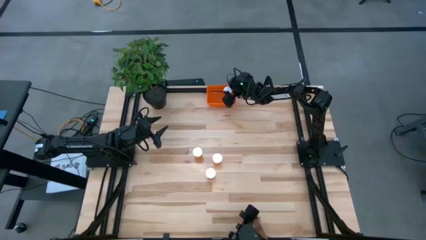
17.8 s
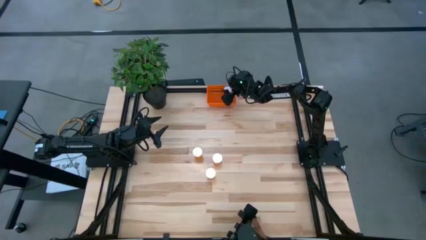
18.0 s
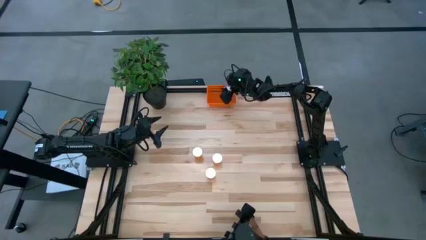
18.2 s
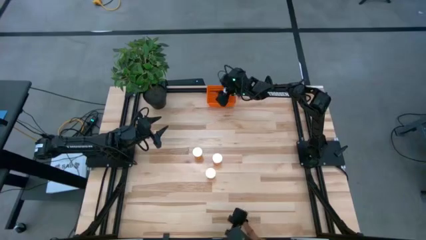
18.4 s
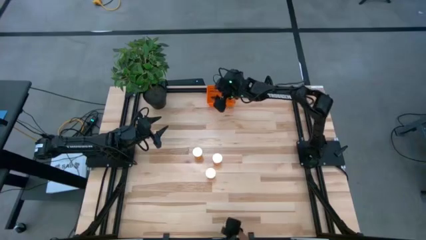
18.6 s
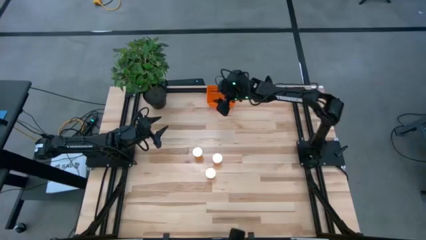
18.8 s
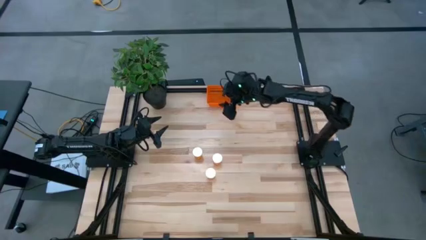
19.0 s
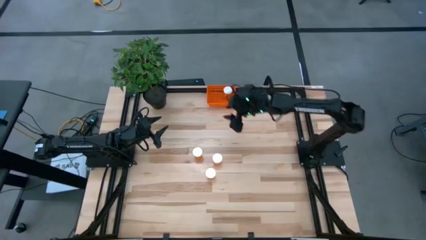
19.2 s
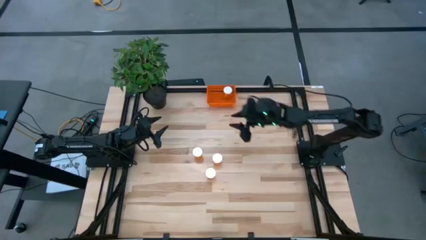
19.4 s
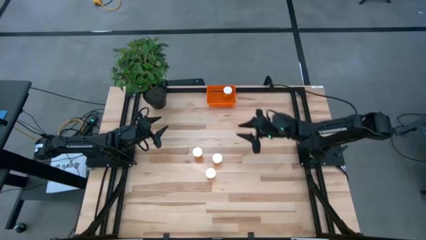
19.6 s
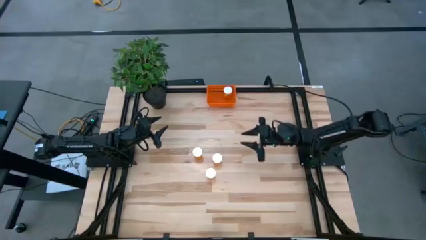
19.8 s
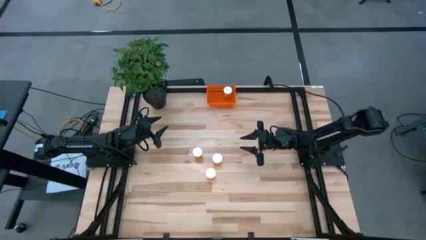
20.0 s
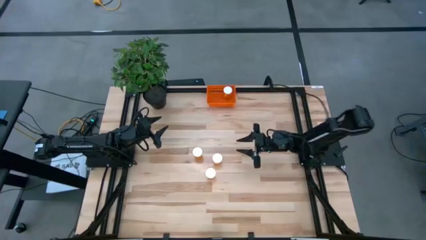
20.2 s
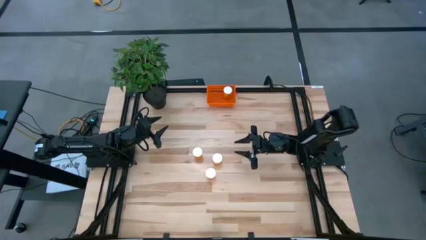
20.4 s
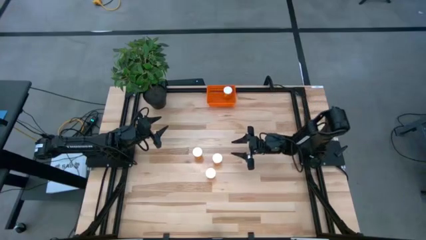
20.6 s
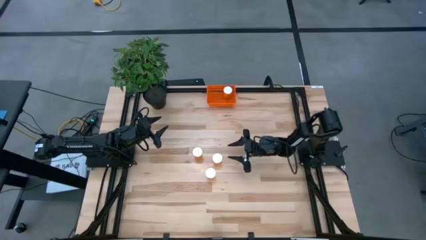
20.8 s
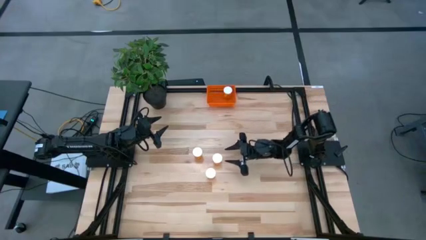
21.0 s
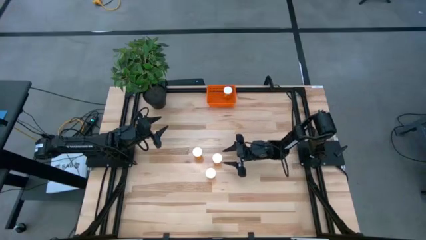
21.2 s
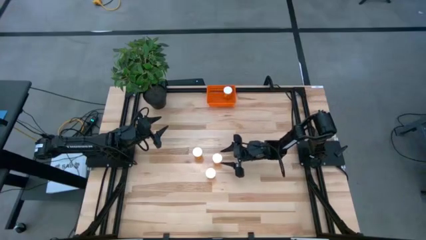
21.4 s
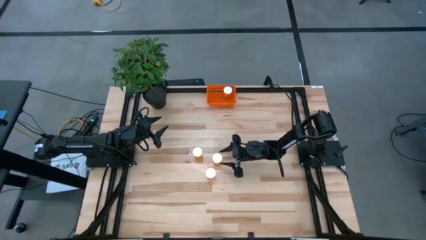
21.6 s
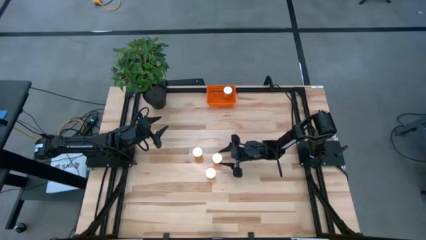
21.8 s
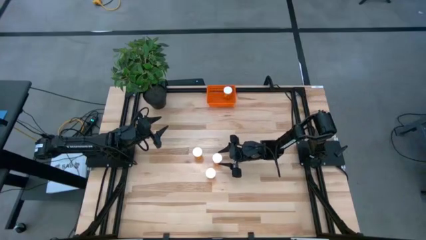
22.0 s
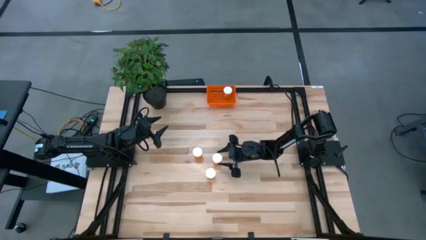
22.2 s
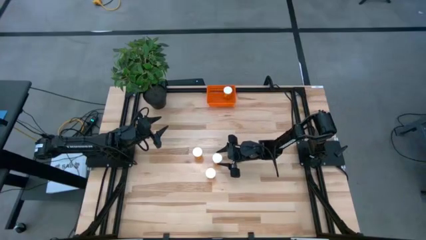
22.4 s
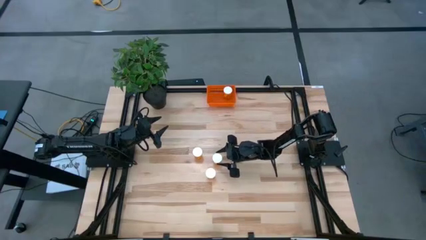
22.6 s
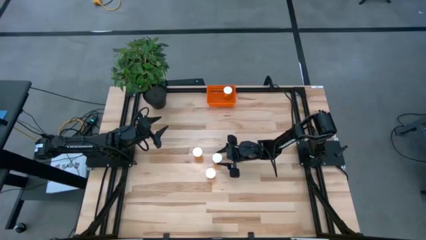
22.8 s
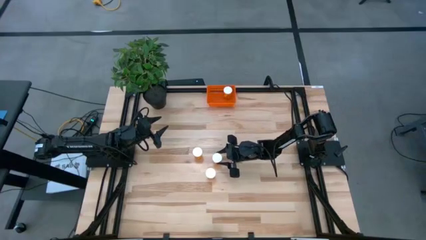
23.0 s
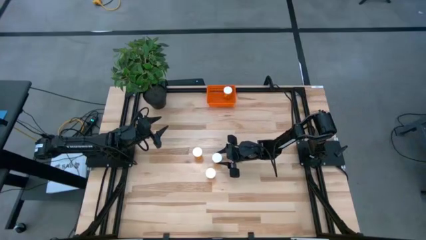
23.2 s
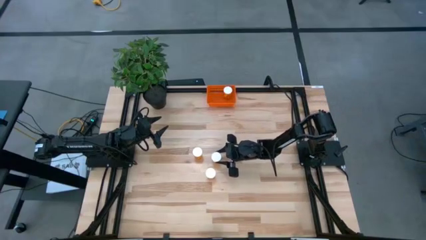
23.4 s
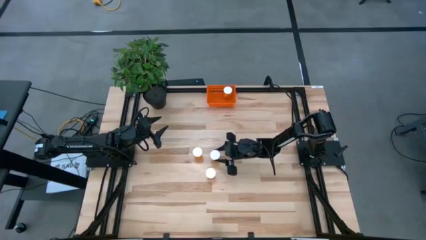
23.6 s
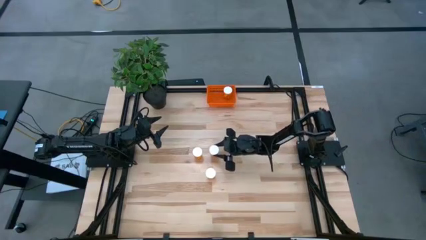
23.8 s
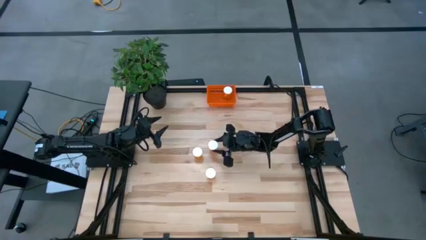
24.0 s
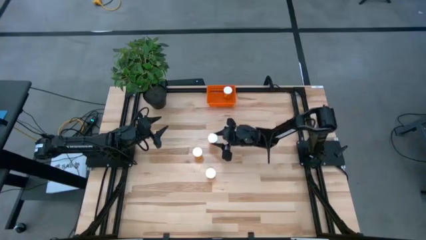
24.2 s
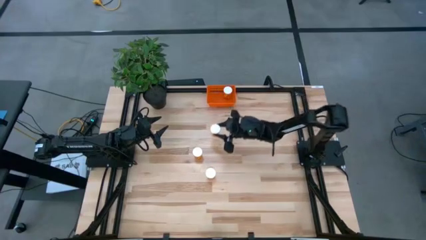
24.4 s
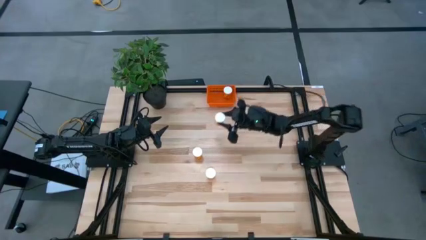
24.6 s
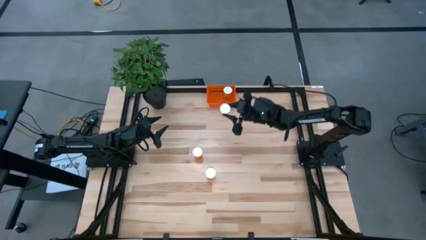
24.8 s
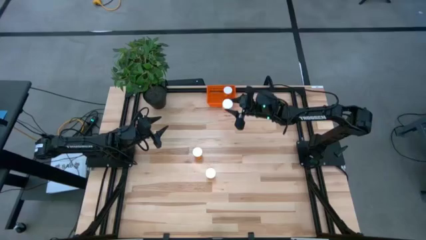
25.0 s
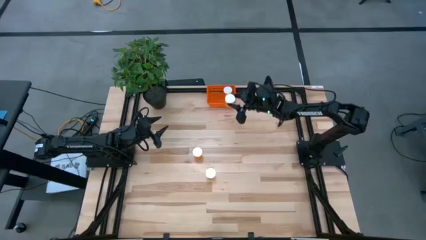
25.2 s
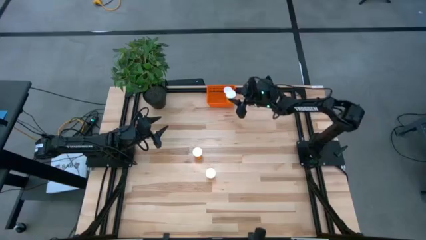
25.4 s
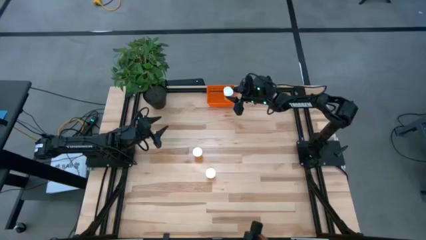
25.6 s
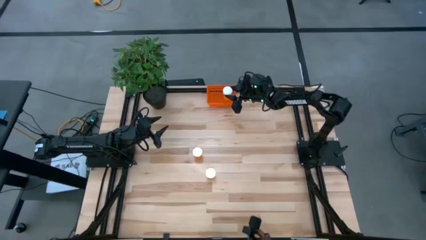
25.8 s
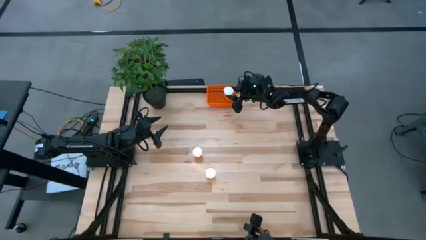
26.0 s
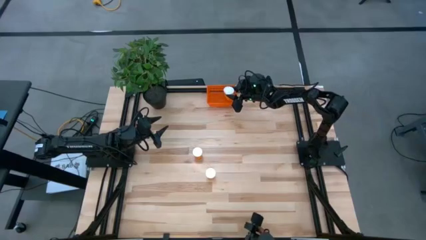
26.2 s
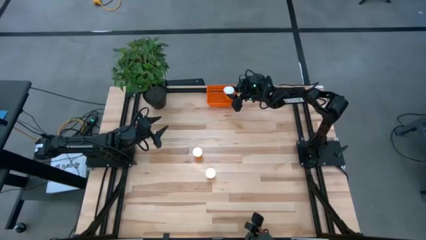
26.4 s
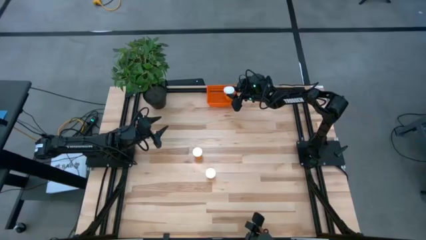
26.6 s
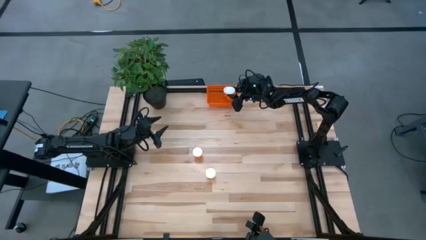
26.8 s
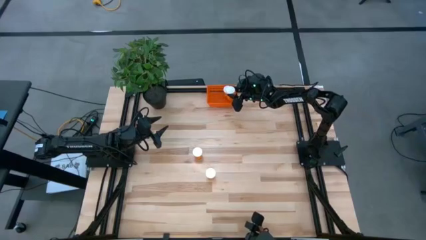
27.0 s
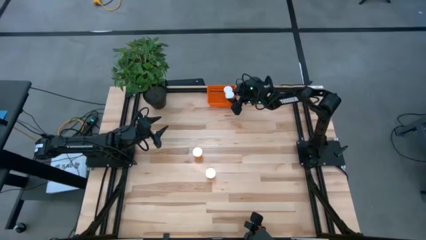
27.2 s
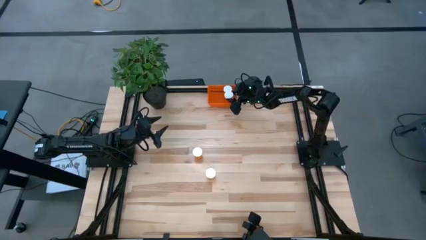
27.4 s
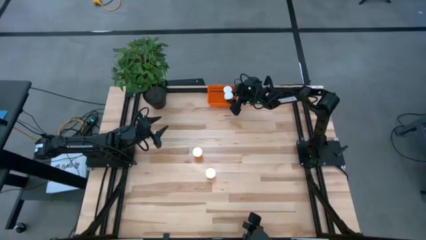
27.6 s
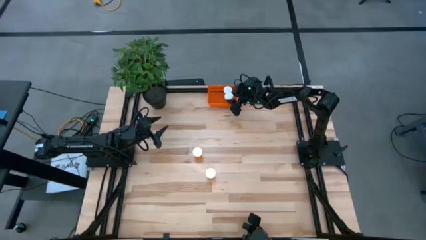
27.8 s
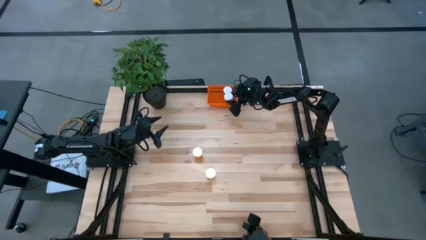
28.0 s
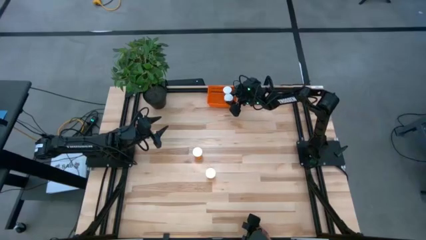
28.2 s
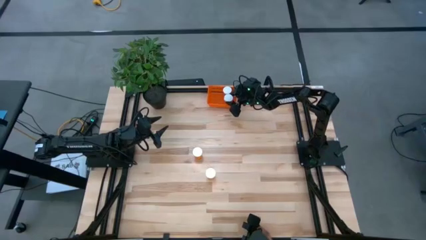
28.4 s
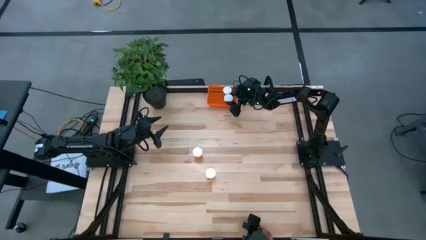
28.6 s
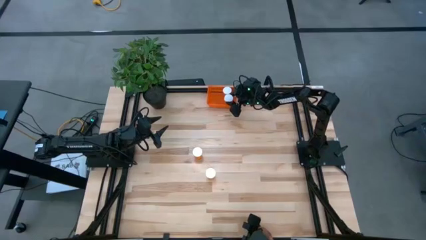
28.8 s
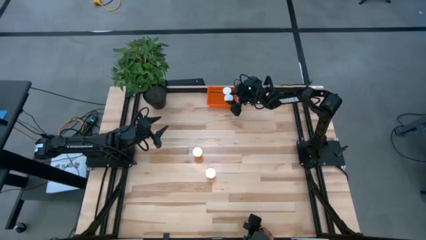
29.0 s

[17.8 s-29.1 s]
Task: Pick and place pill bottles into a basket
Put the top right orange pill bottle into the orange bin

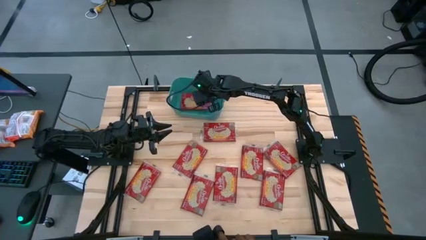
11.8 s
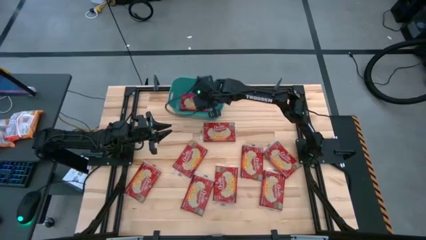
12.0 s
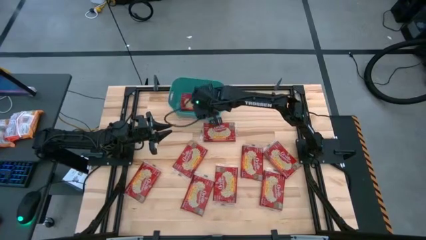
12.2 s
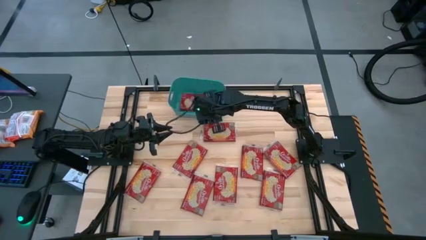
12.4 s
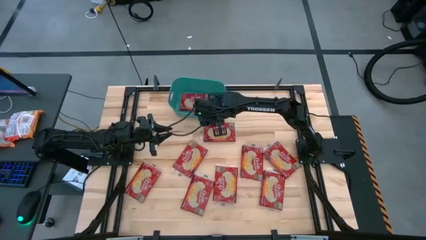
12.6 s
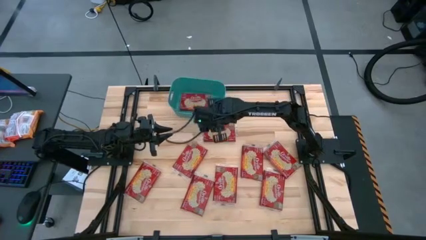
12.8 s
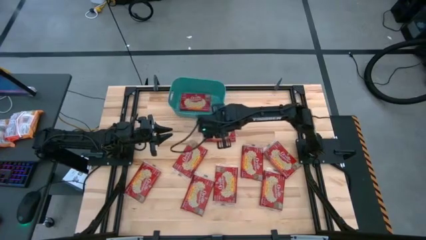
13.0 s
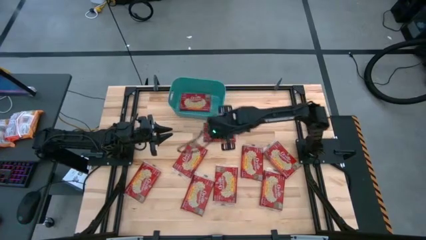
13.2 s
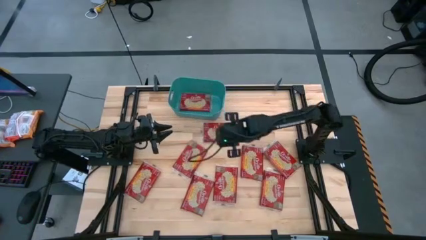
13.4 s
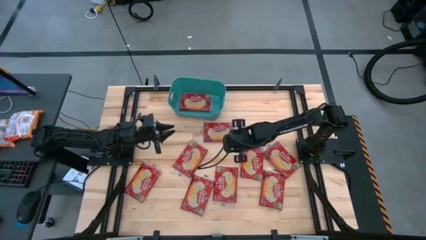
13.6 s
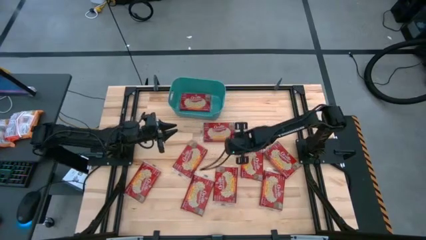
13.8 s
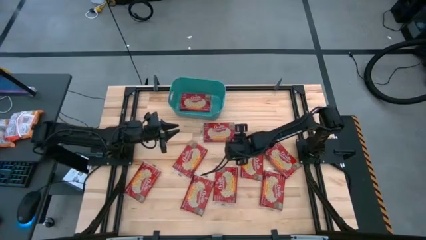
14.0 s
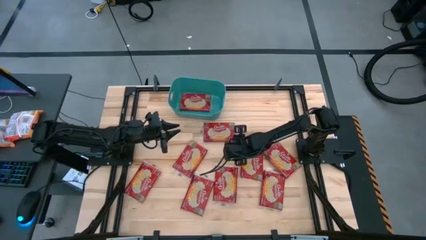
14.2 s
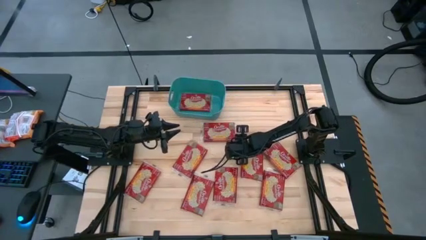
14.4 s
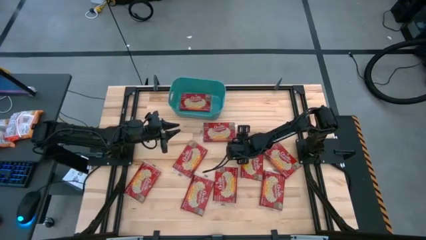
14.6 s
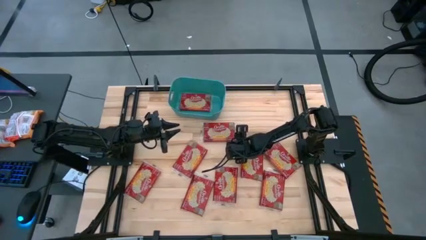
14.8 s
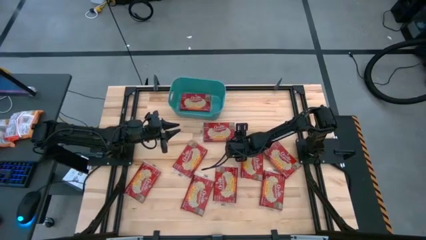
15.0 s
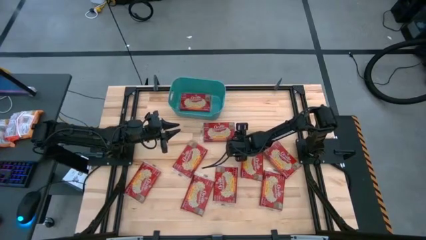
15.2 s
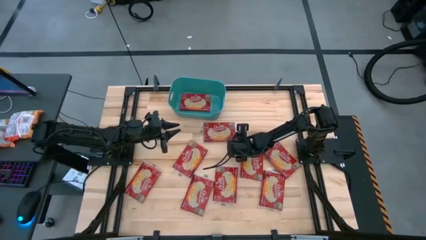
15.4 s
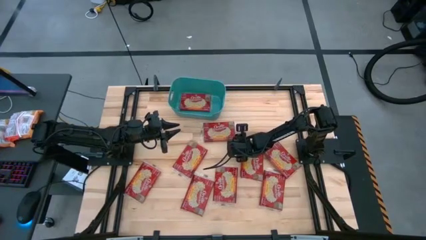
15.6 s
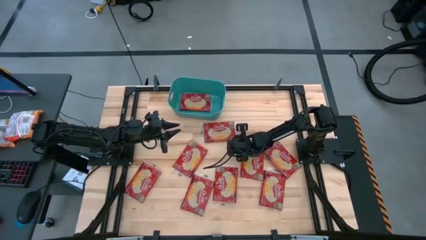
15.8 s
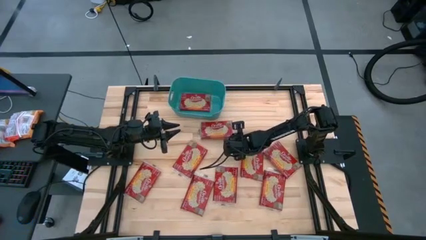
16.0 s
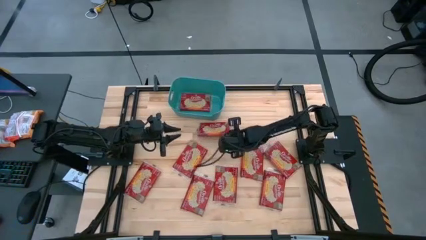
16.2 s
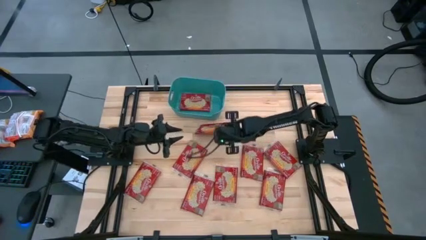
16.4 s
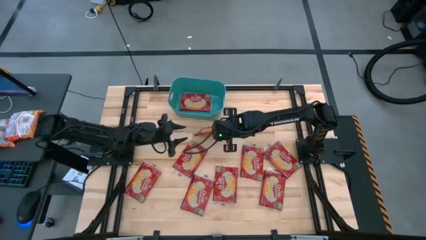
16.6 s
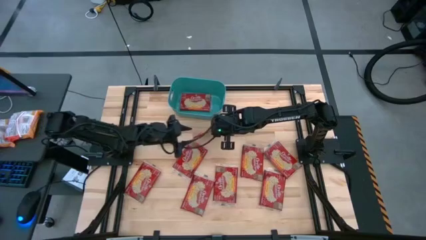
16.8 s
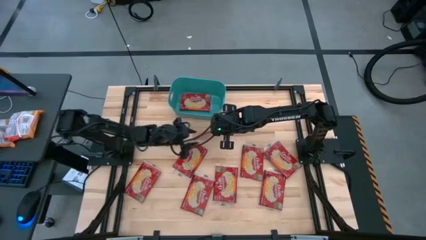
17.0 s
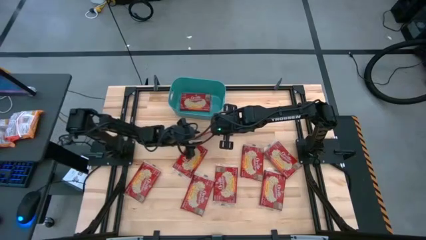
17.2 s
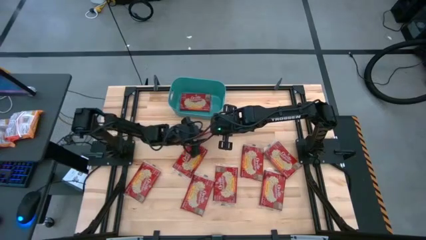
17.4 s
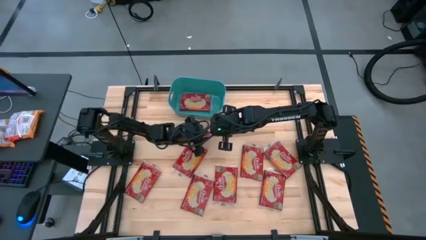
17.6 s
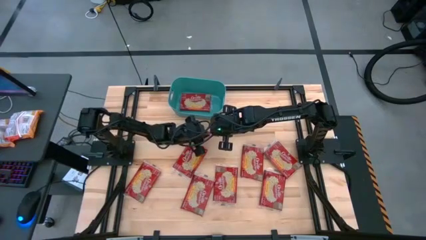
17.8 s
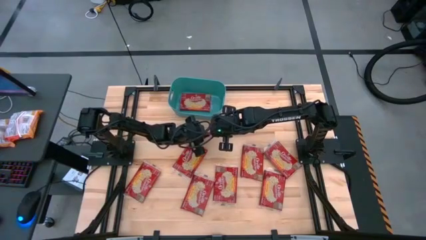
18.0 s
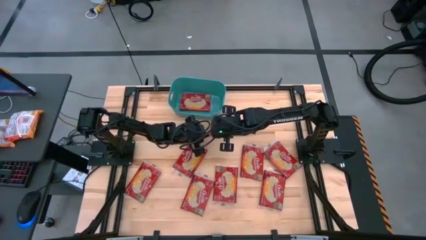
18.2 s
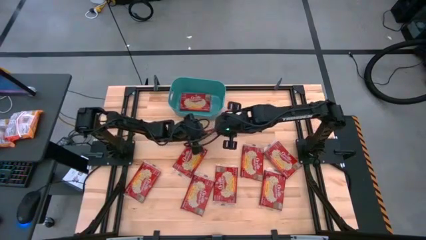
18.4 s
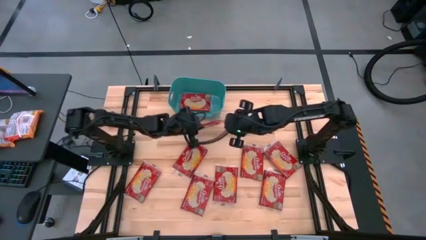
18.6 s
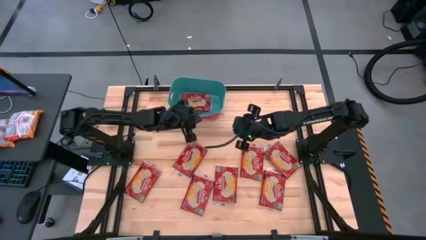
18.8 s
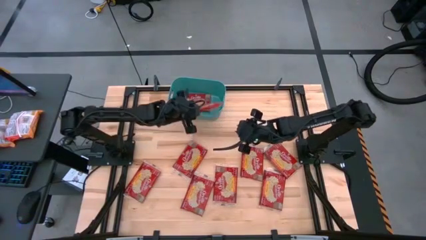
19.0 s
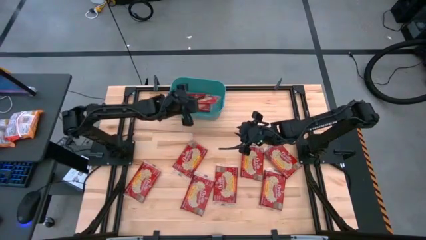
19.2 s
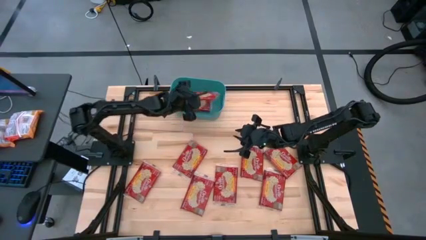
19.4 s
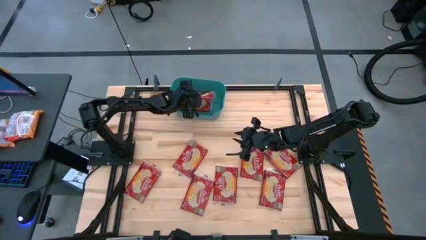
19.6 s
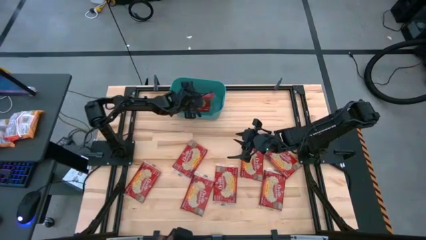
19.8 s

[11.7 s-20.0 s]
Task: Sort popcorn bags into baskets
Put the red popcorn bag into the green bin
